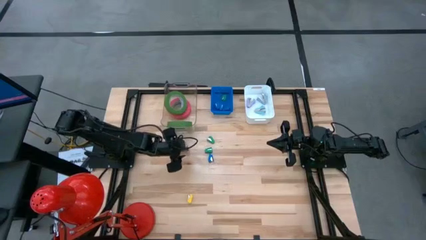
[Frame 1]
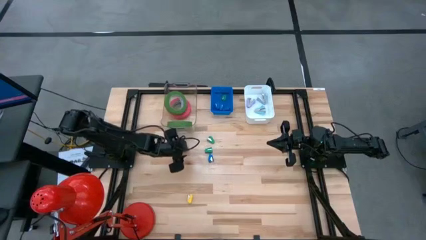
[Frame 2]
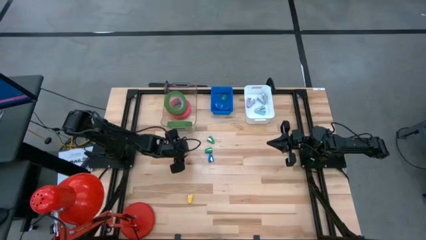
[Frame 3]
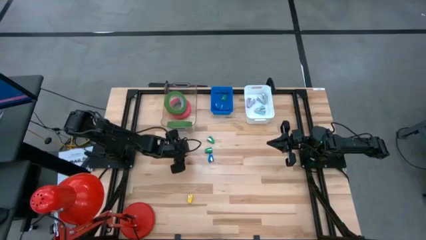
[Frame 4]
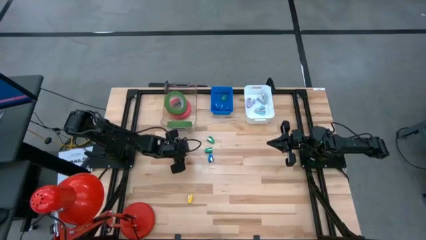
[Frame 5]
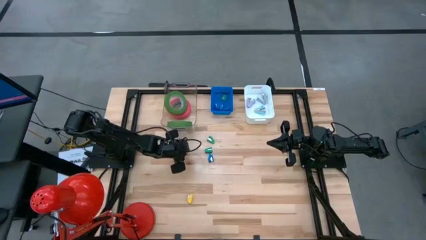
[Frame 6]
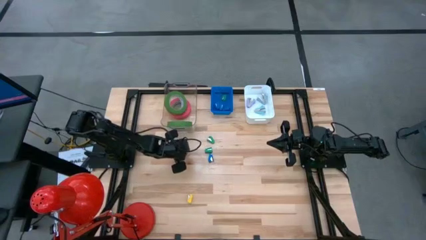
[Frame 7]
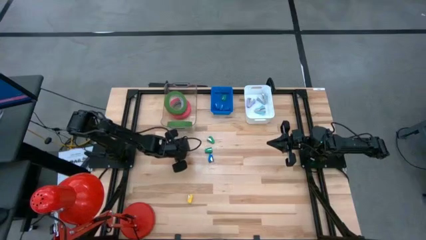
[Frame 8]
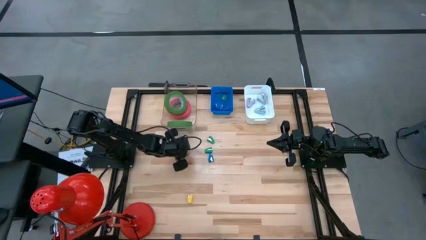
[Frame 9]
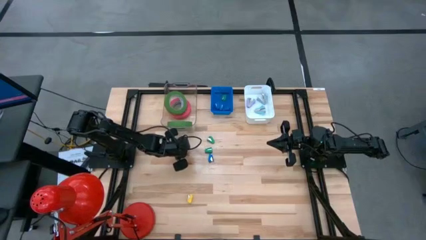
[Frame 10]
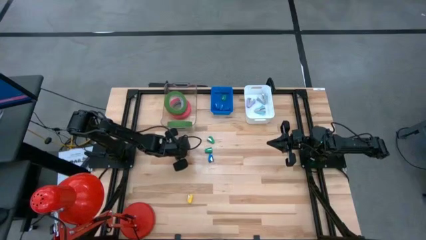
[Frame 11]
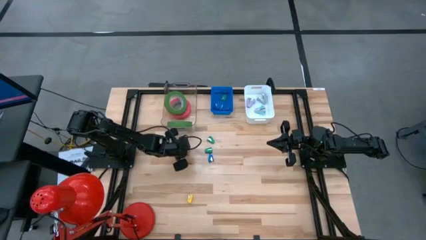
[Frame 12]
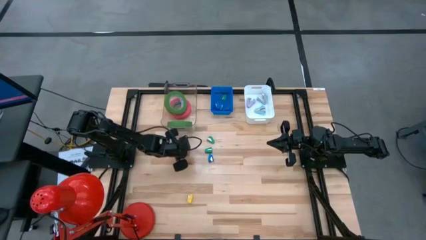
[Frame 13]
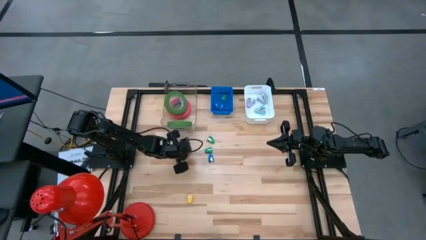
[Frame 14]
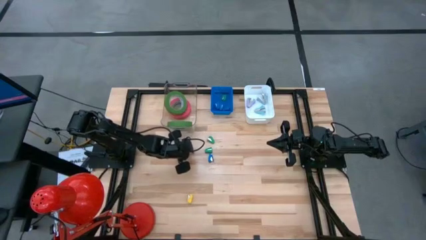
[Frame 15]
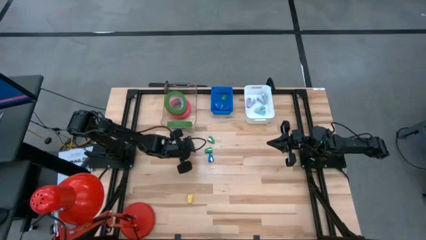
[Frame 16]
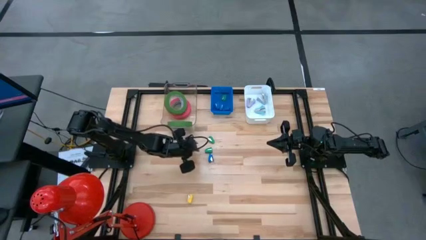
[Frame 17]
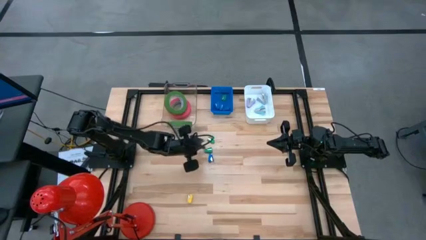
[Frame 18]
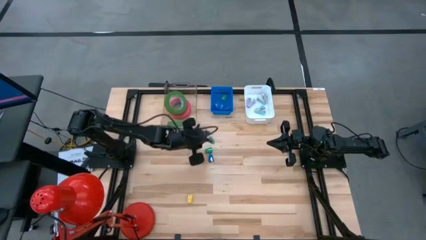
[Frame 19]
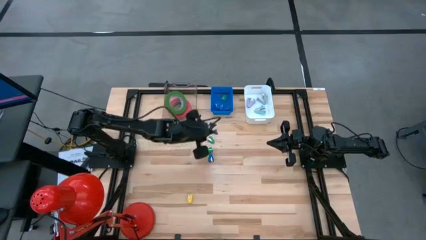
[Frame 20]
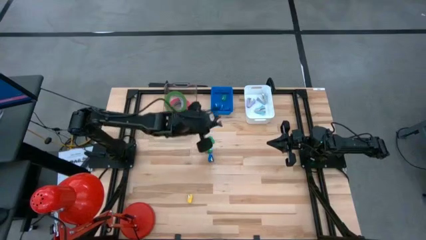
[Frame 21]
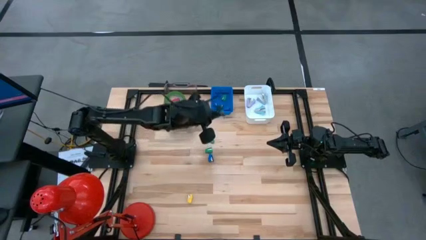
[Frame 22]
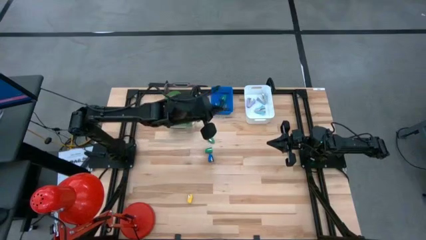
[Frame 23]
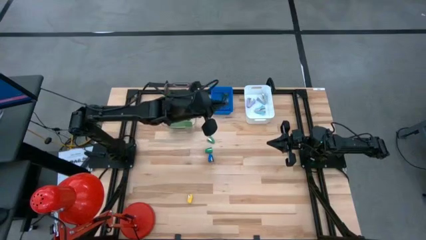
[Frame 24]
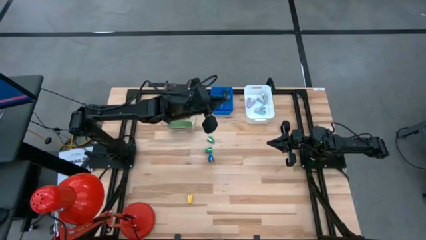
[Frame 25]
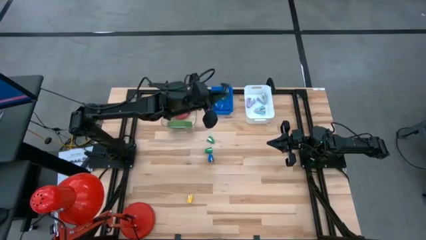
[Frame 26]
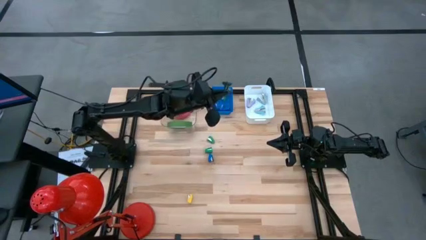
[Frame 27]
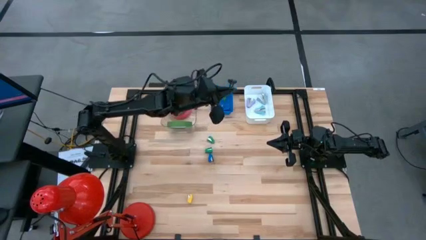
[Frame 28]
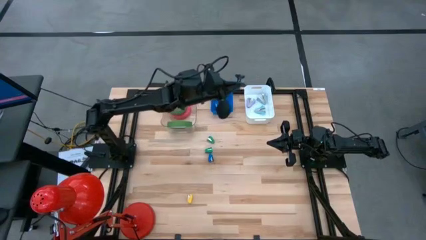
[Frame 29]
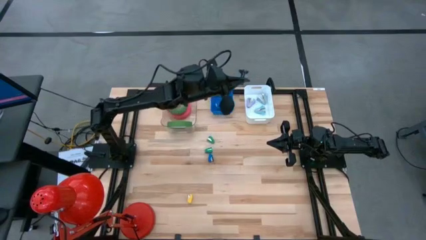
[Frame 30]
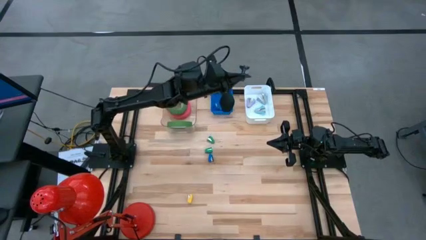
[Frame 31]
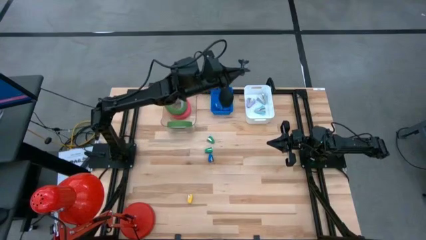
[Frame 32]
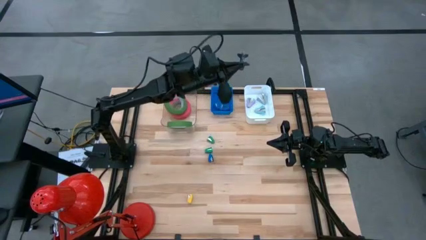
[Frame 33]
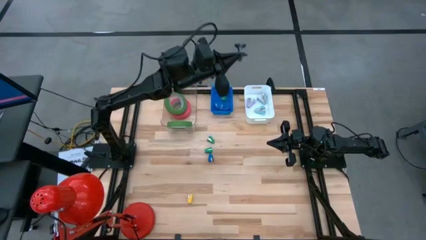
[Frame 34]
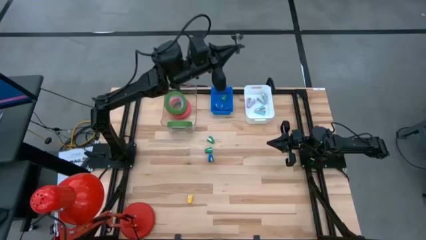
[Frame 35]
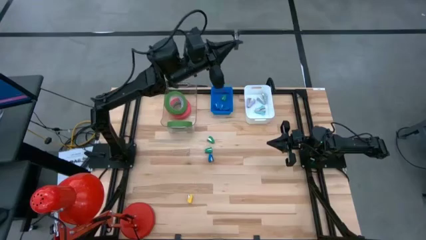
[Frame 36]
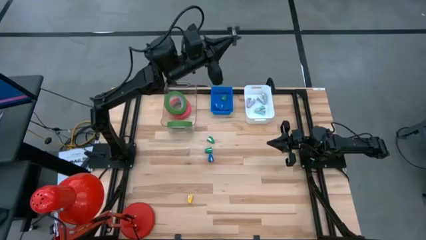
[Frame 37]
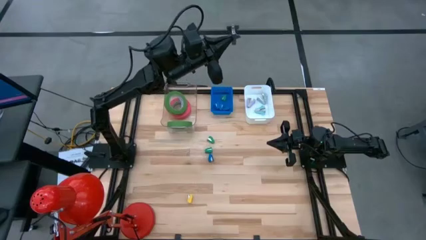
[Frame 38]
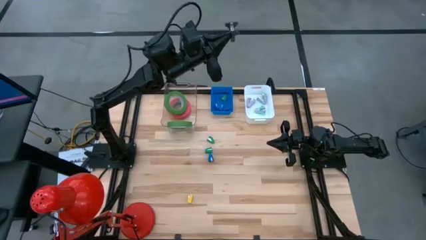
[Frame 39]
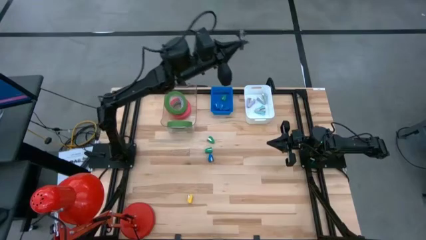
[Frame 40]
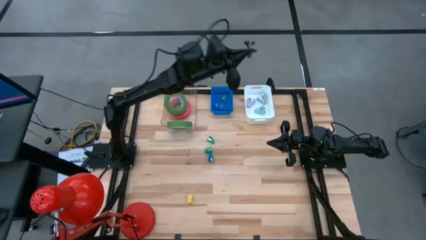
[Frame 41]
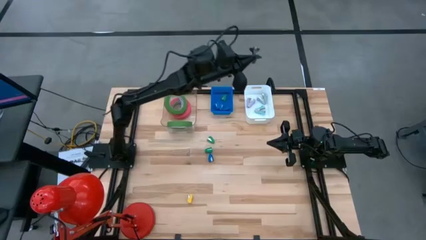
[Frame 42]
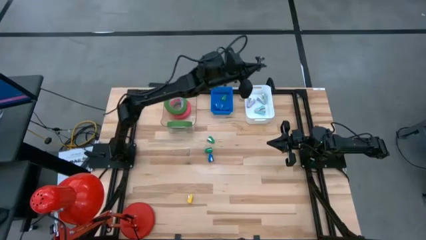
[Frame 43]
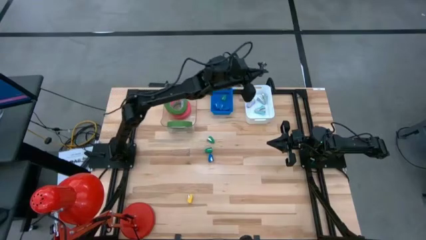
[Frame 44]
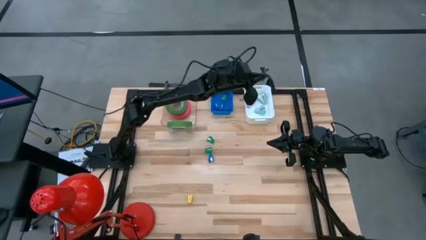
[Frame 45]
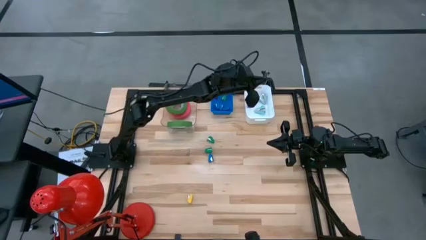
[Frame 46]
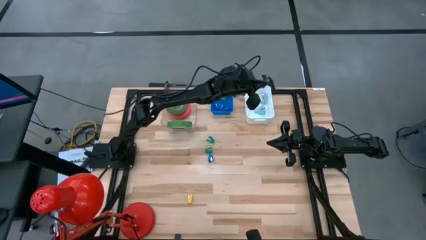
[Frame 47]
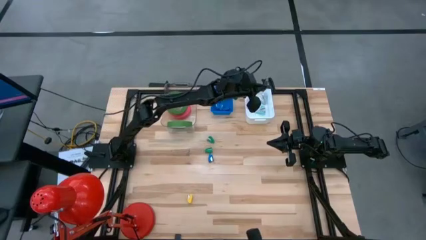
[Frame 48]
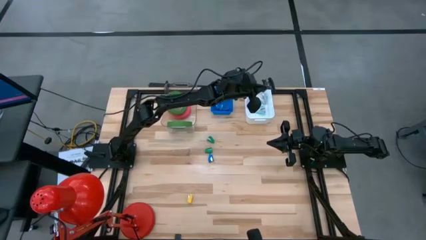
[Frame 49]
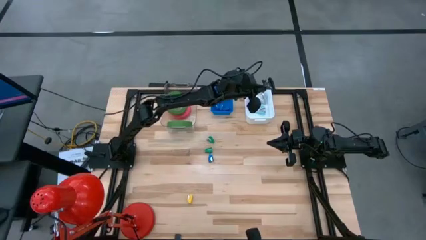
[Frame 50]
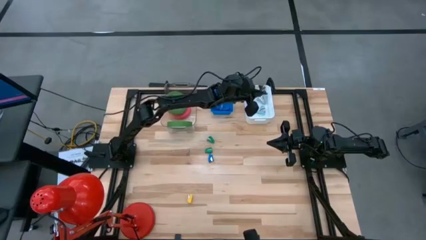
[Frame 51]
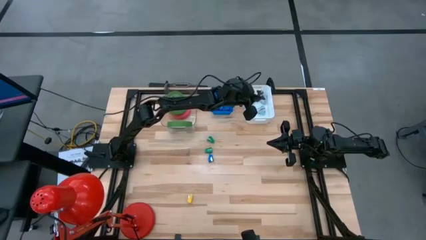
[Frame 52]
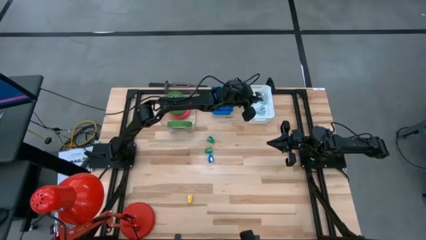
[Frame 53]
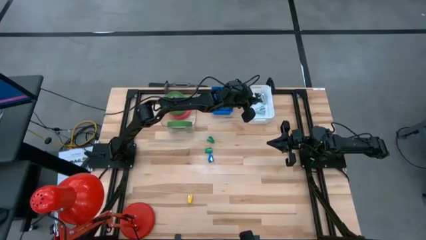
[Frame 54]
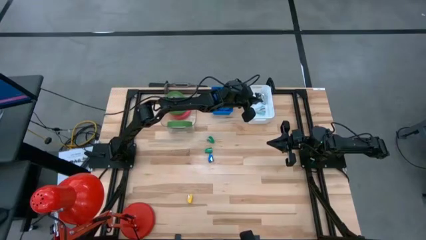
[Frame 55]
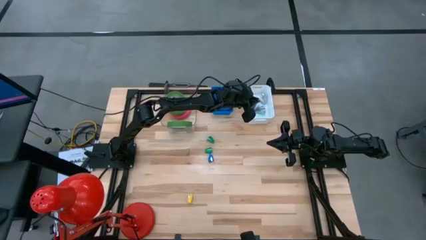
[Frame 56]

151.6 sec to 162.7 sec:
Task: Pick and place Stapler, Stapler remover, tape
Put the black stapler remover into the white bin
